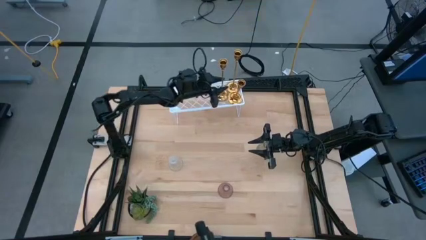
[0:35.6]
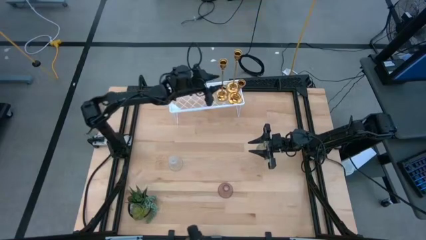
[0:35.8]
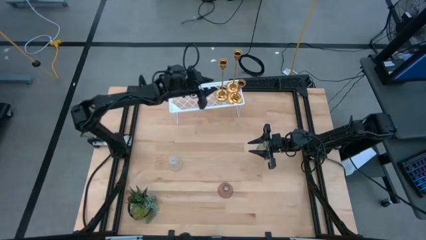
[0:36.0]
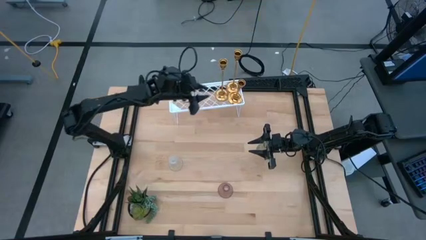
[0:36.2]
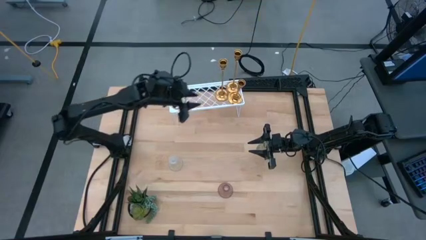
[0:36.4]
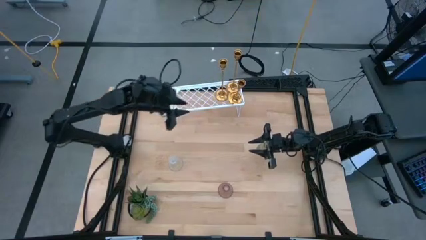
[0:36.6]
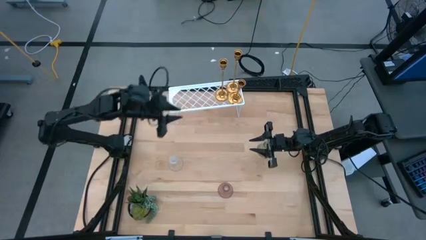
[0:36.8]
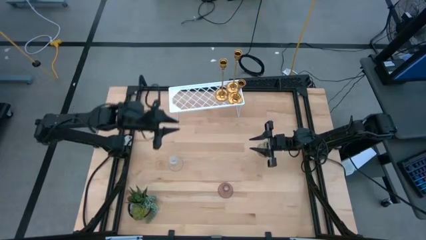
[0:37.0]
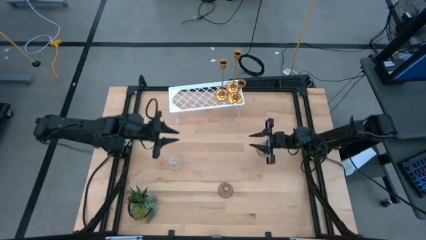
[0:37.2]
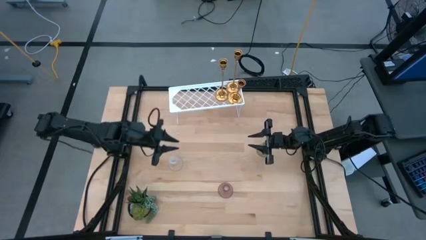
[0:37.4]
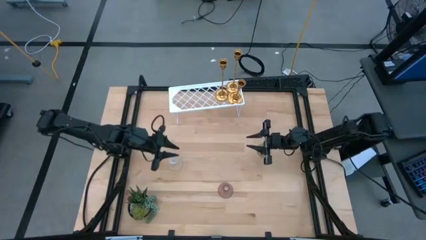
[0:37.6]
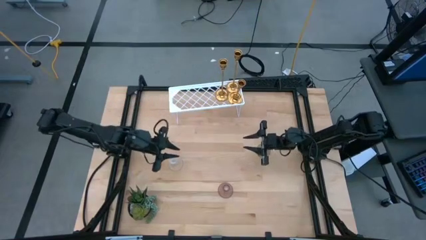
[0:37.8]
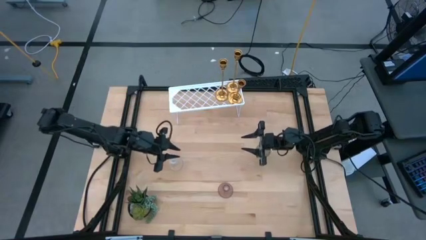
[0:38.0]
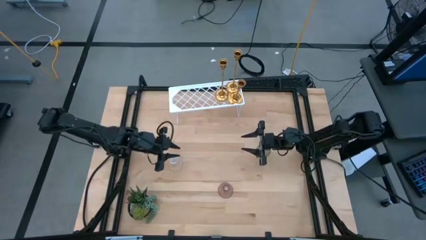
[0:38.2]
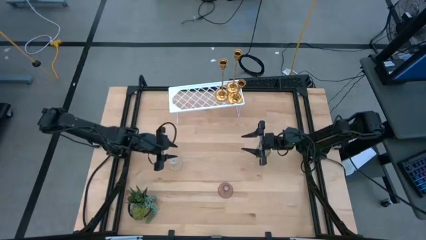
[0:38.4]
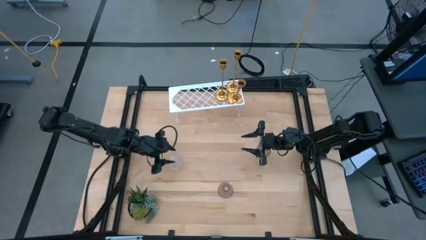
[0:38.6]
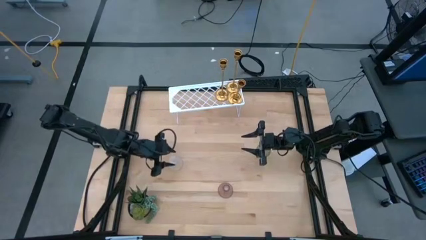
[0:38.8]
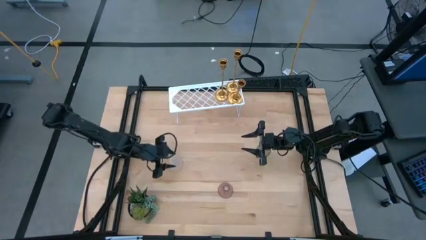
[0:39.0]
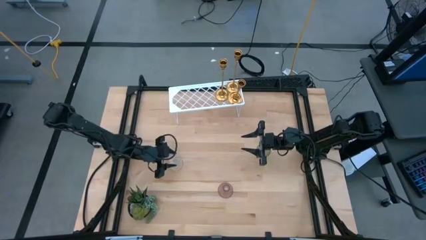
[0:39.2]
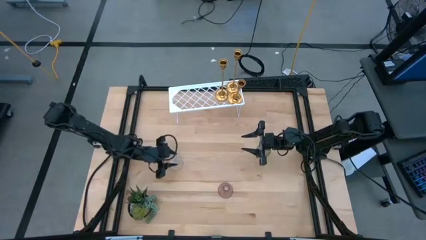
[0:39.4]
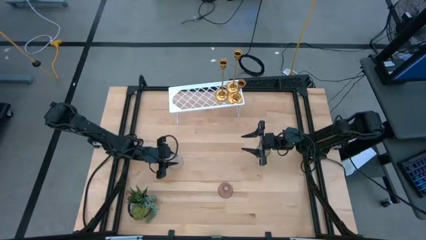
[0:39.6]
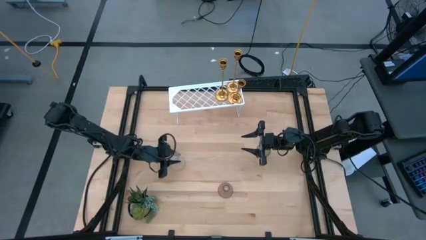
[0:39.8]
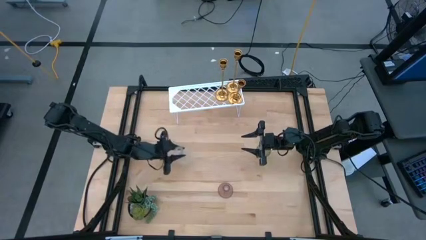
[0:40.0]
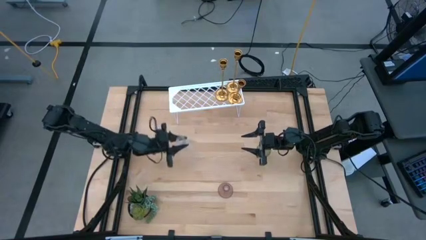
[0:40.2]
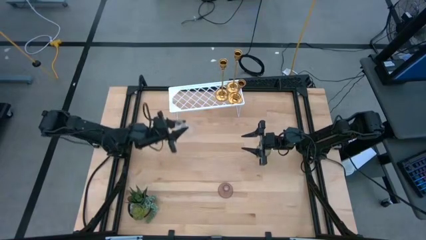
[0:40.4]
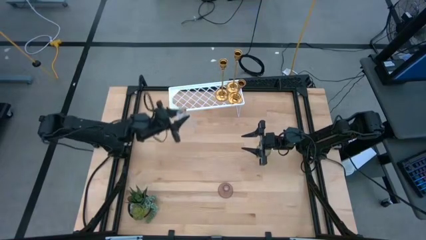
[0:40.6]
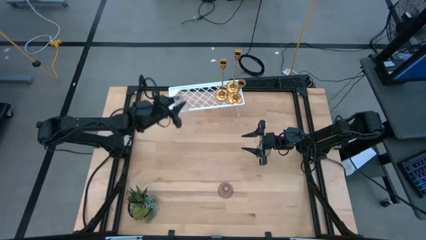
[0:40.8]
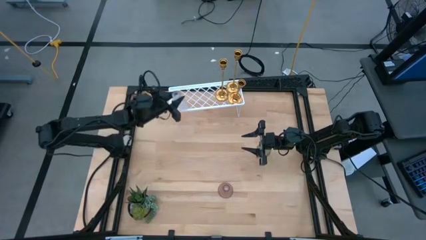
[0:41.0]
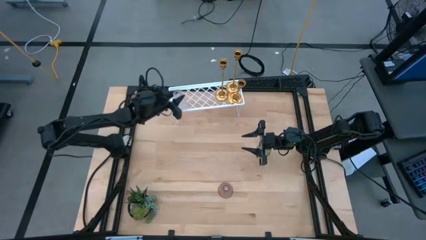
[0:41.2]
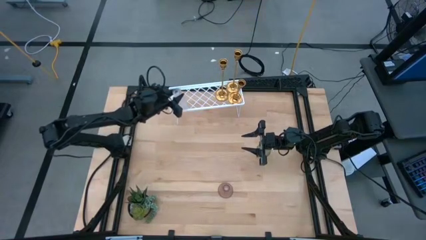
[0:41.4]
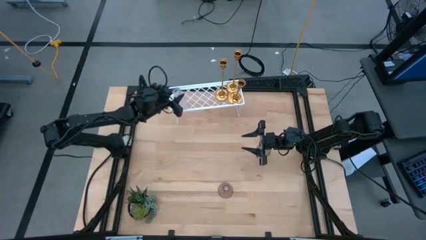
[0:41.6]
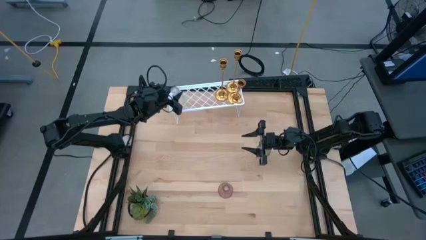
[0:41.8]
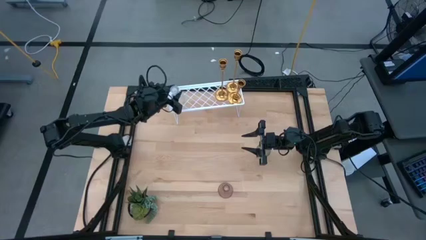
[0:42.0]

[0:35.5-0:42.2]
Task: Pick & Place candle stick holders
Put the transparent glass candle holder on the shelf

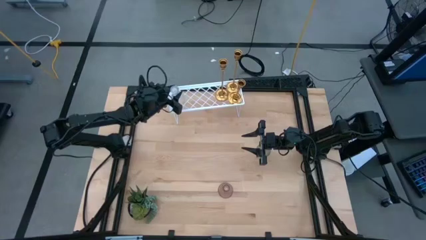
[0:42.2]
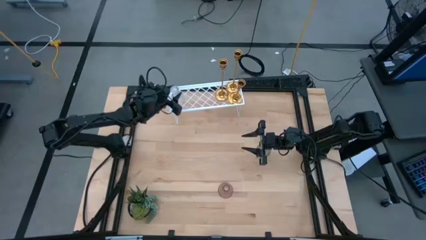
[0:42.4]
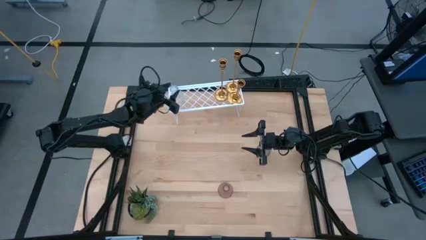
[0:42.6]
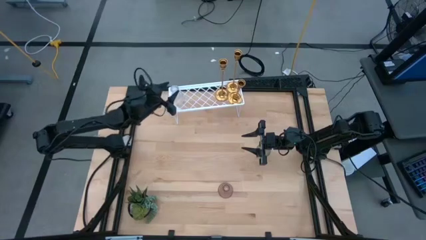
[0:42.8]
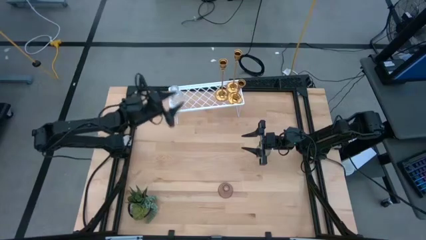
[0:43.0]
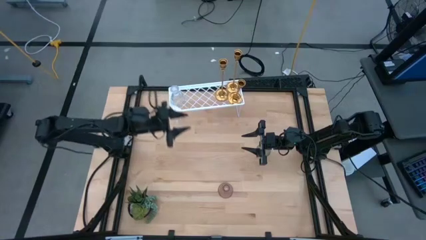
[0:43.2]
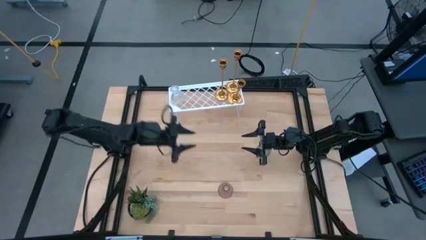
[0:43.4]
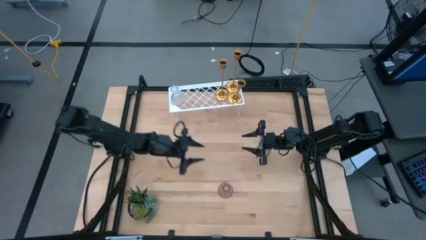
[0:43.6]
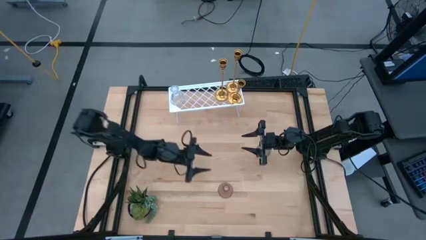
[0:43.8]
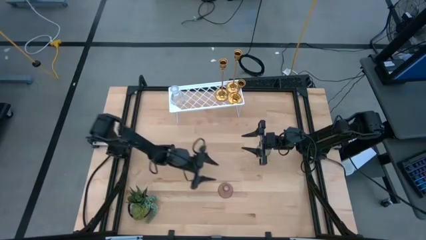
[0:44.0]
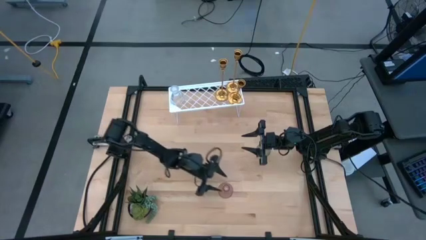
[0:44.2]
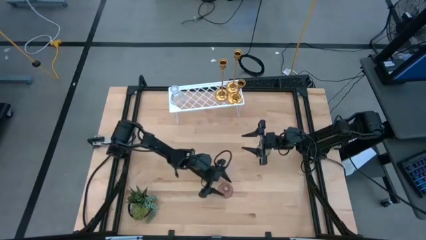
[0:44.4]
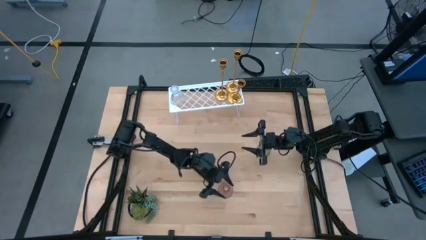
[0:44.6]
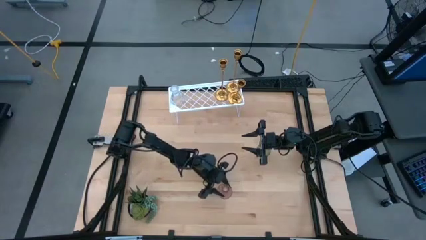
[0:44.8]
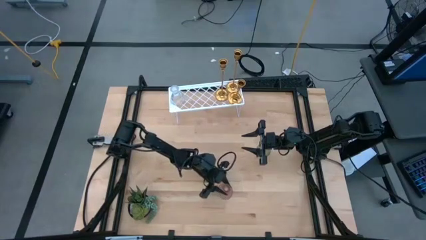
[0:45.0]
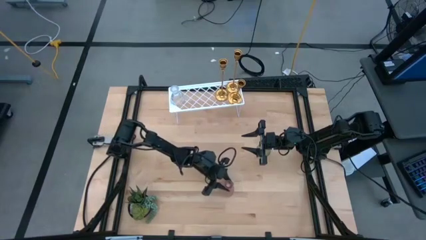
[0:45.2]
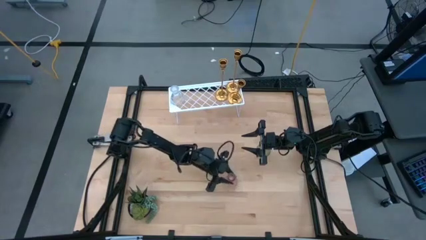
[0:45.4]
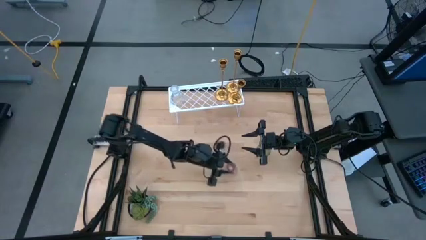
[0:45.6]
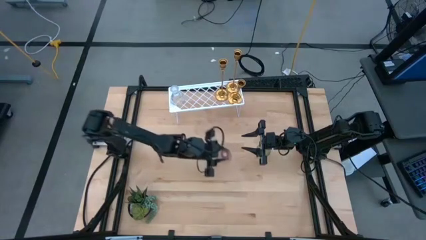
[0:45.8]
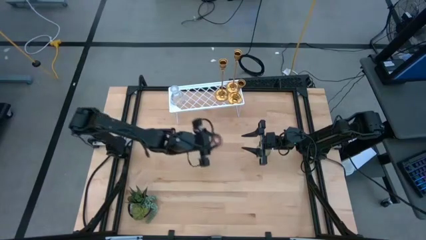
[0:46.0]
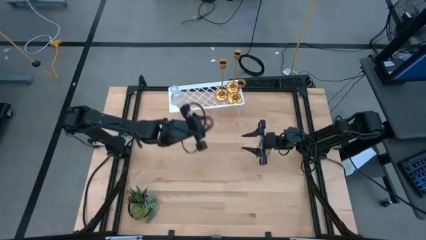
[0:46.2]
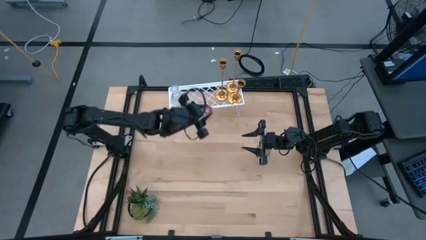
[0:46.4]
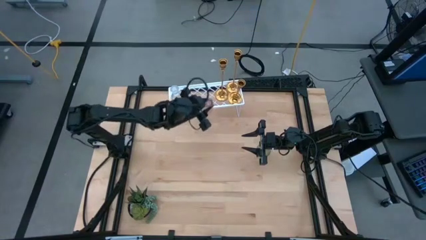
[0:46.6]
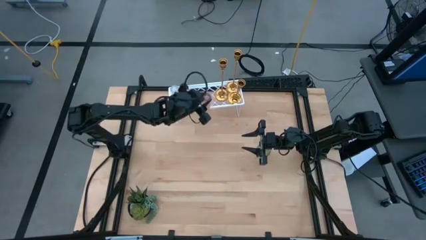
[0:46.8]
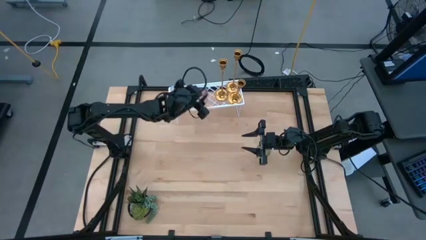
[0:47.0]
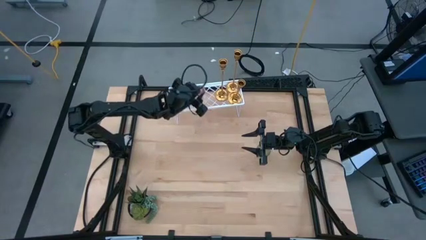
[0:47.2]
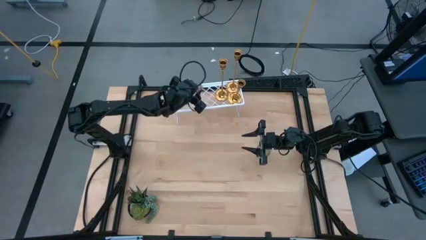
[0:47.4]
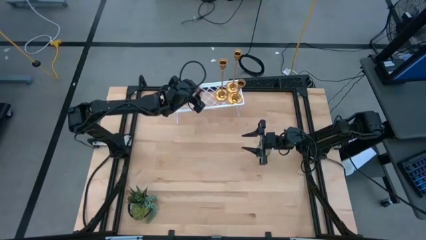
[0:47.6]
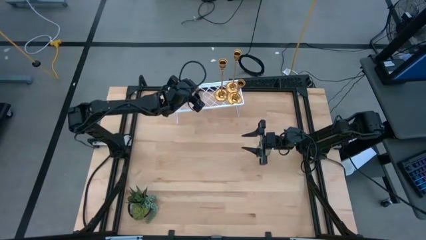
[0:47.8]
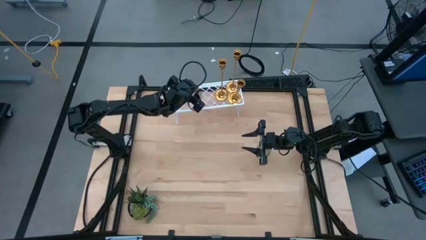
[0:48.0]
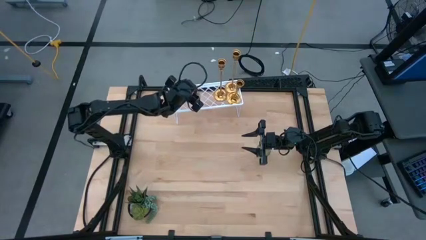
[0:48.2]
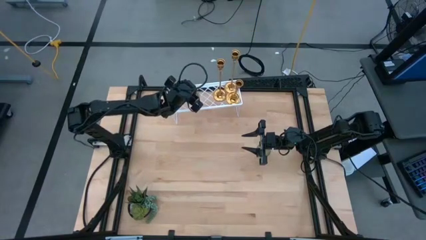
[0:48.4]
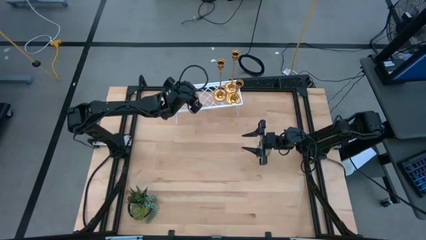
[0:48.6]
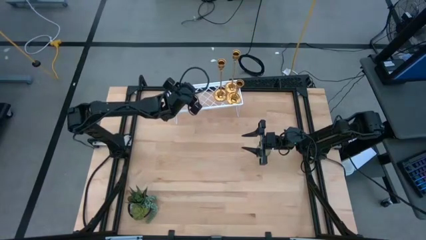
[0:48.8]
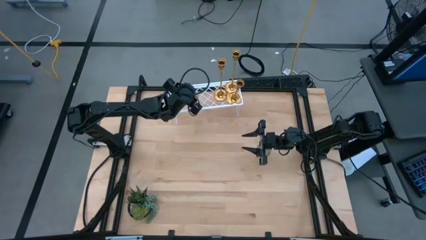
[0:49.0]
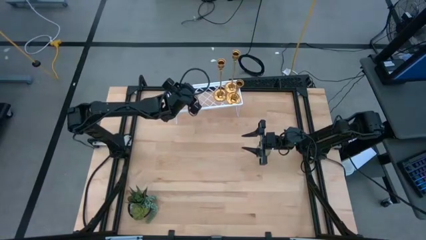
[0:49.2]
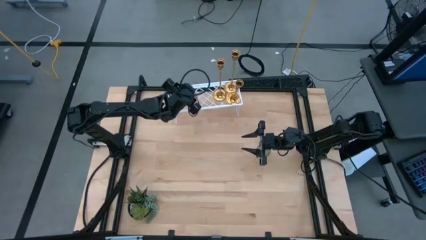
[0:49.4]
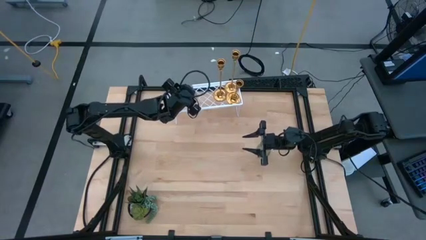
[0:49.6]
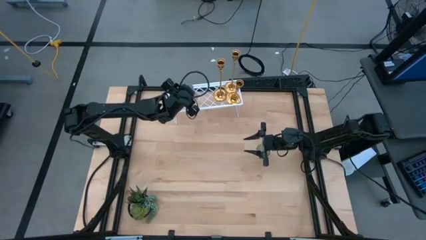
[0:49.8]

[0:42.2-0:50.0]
Put the pink glass candle holder on the shelf

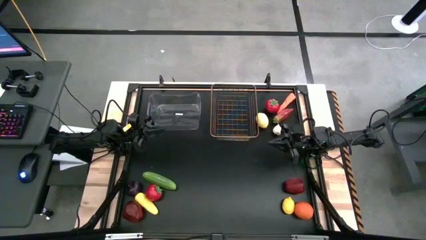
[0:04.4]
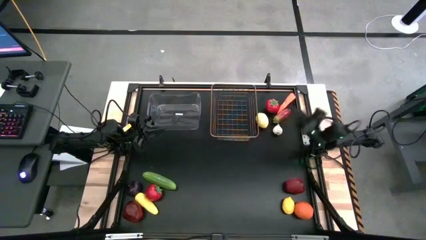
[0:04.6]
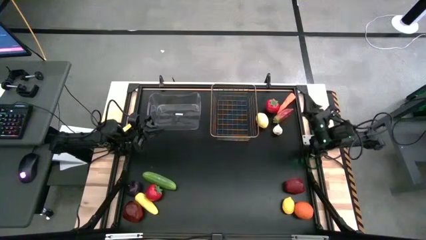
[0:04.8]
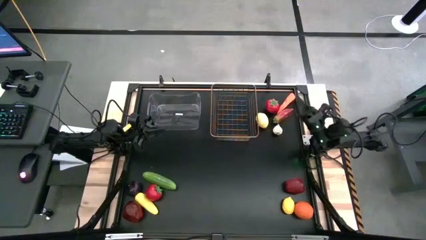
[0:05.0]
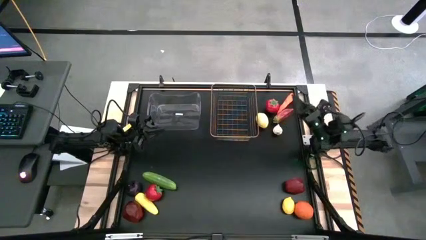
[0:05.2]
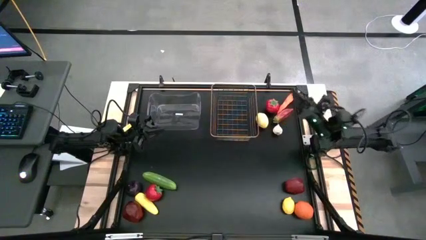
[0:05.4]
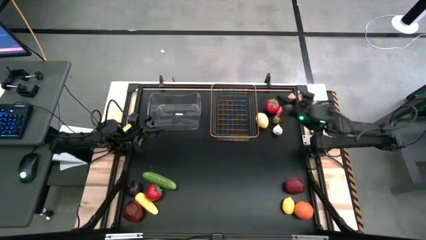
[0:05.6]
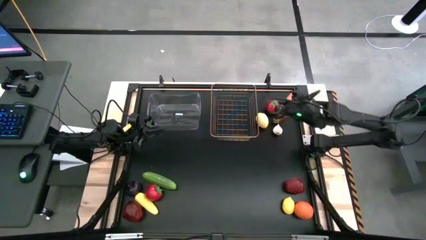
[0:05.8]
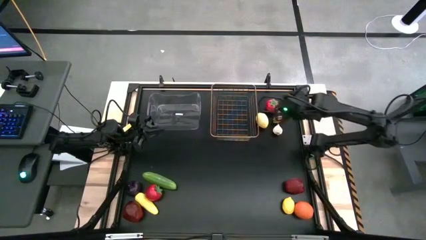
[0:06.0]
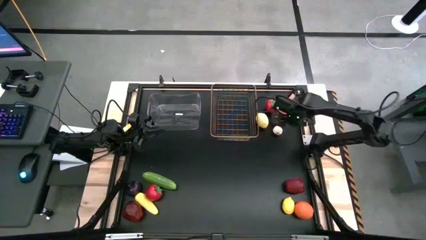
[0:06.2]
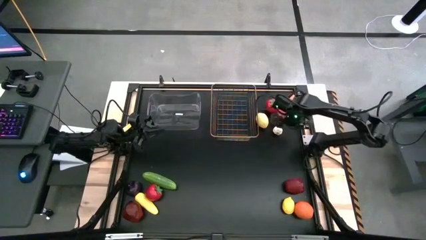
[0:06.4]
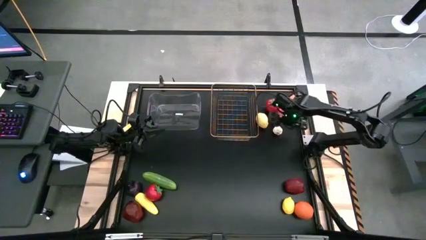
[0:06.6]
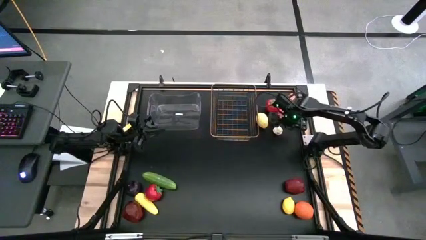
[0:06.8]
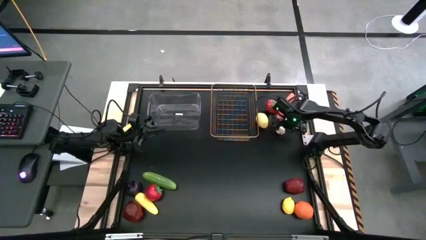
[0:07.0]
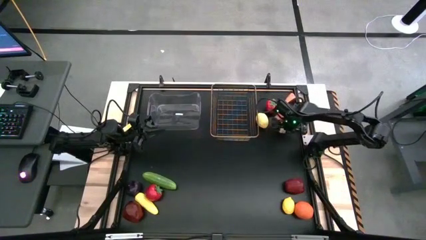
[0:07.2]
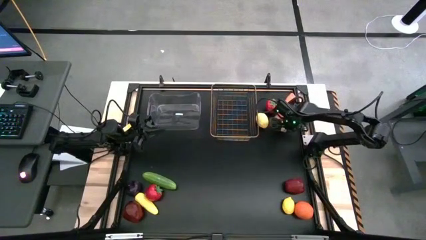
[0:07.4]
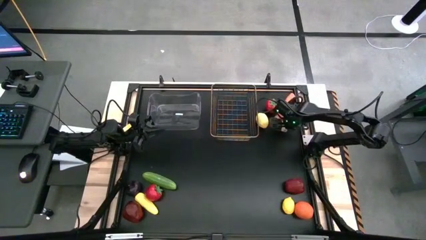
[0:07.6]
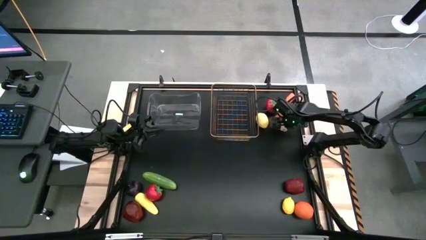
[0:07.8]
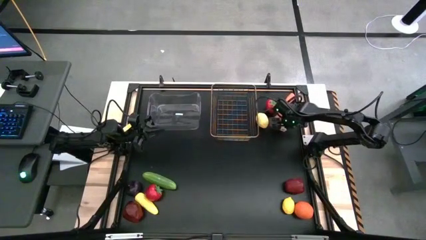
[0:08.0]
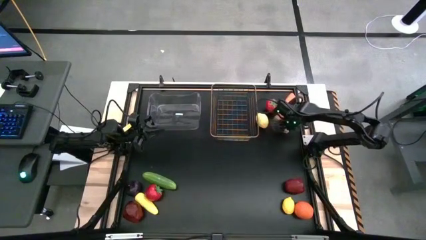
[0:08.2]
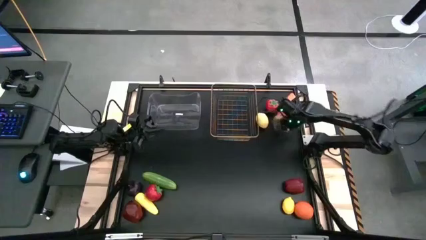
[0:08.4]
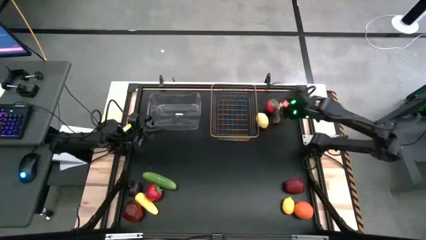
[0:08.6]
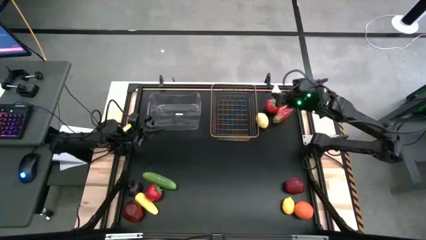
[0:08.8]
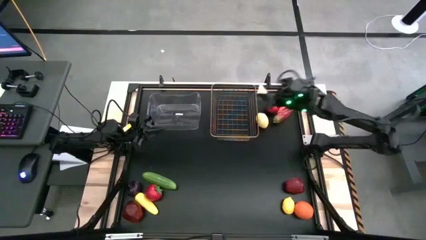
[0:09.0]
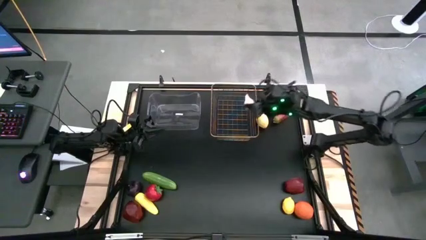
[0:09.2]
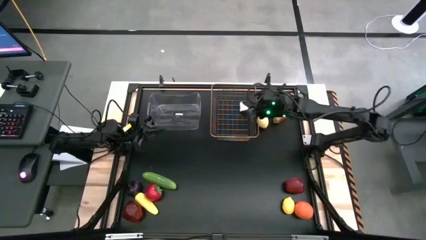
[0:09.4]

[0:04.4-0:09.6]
Task: Sort produce into baskets
Put the garlic into the gold wire basket
